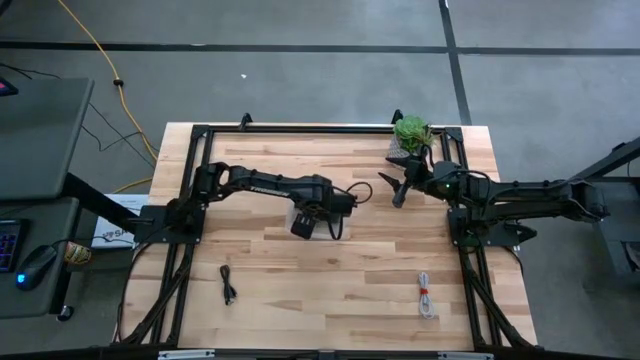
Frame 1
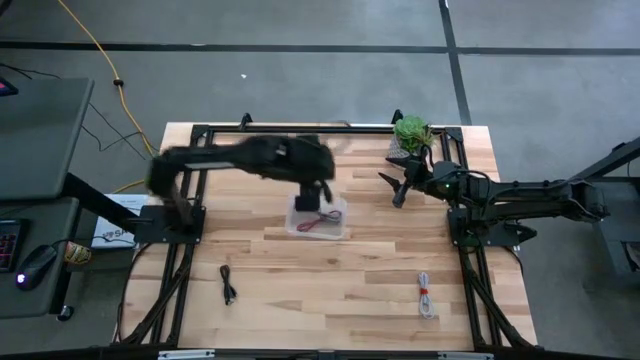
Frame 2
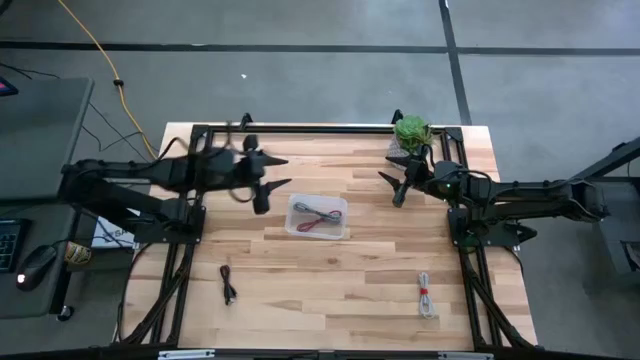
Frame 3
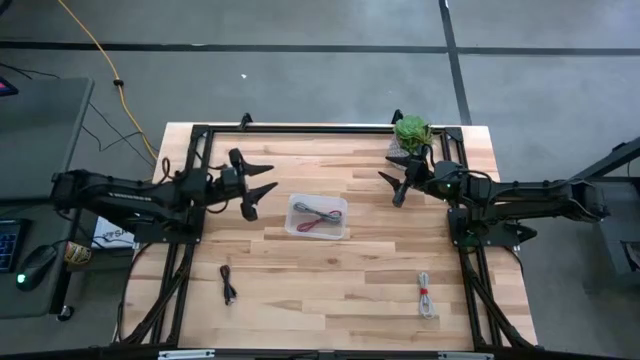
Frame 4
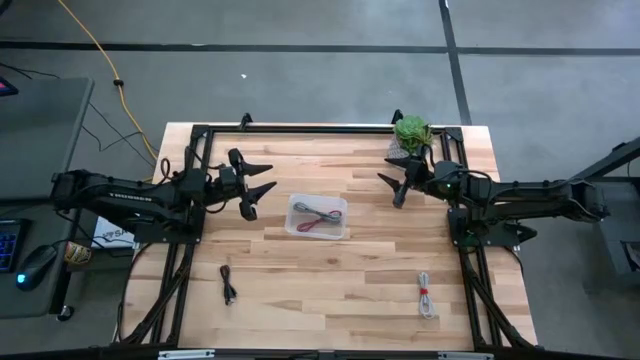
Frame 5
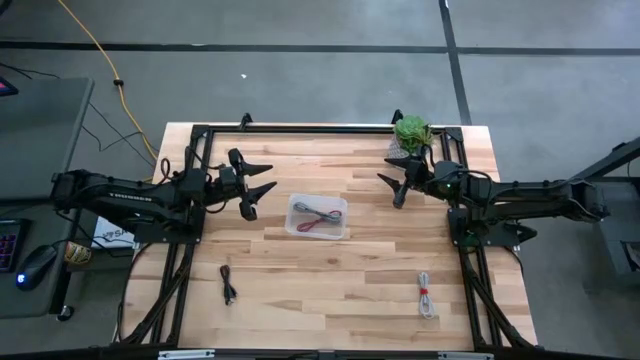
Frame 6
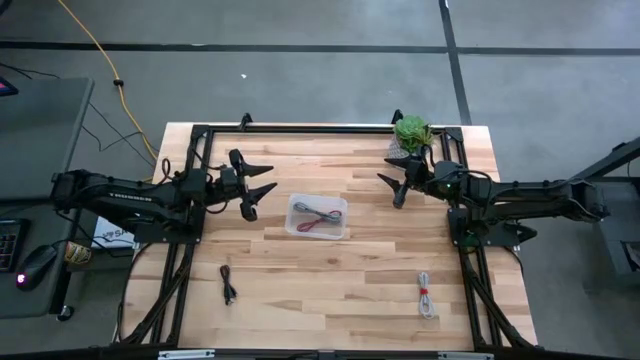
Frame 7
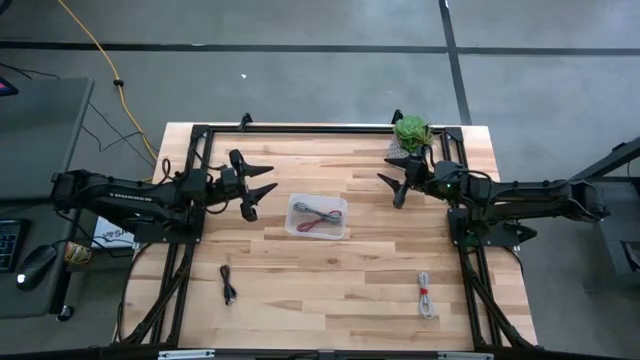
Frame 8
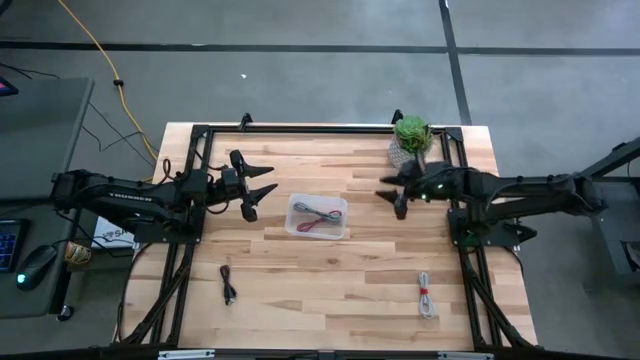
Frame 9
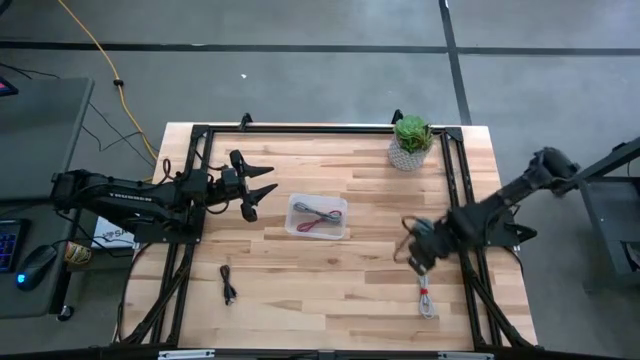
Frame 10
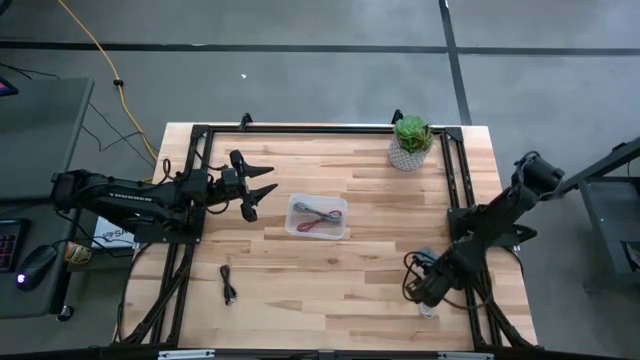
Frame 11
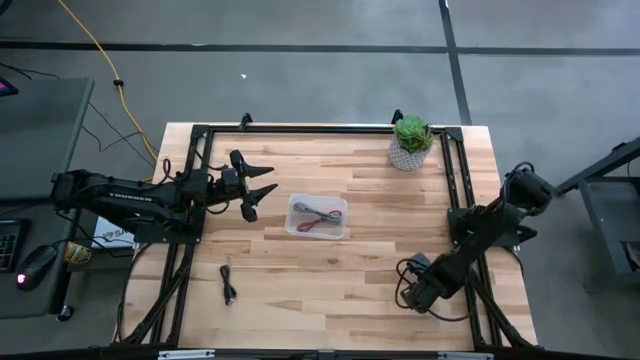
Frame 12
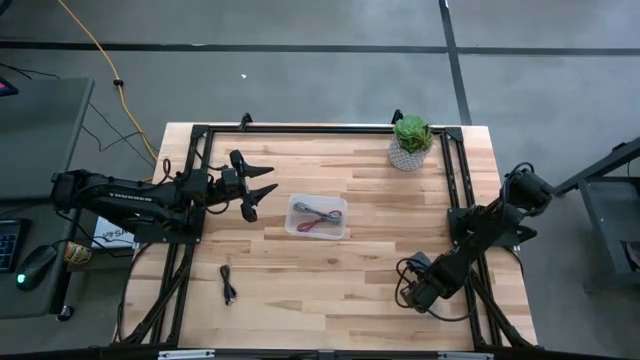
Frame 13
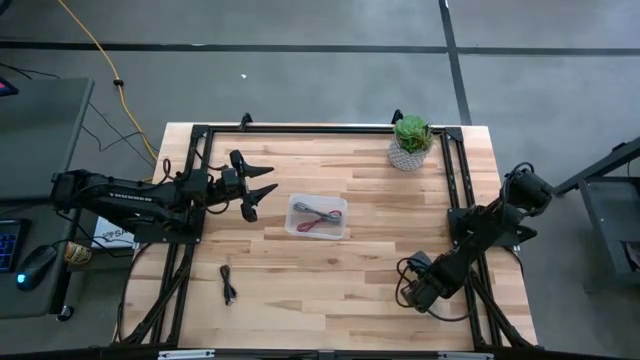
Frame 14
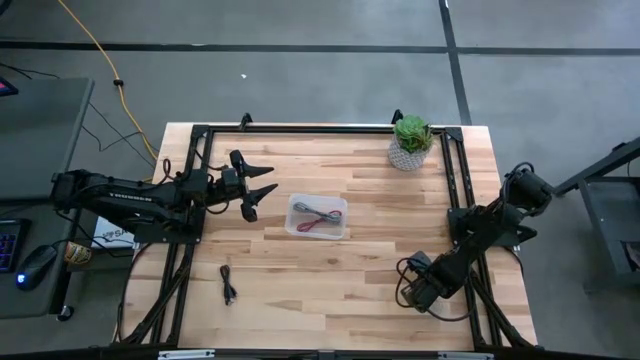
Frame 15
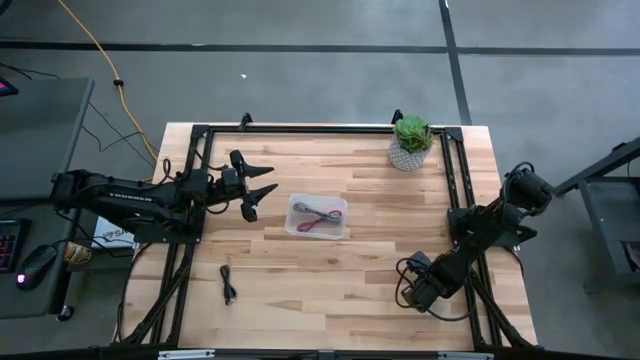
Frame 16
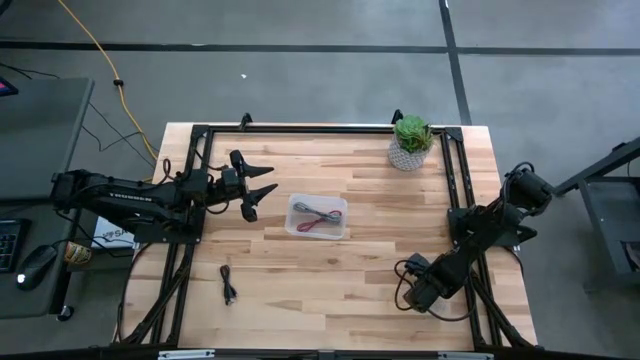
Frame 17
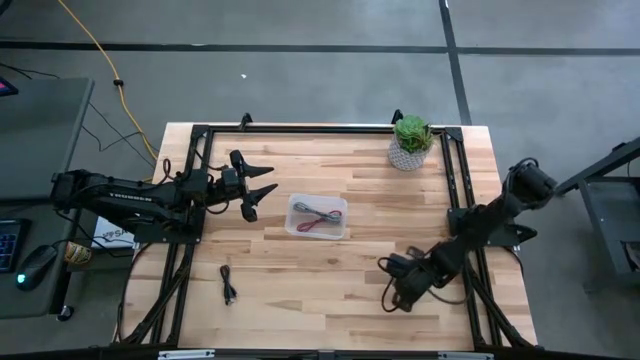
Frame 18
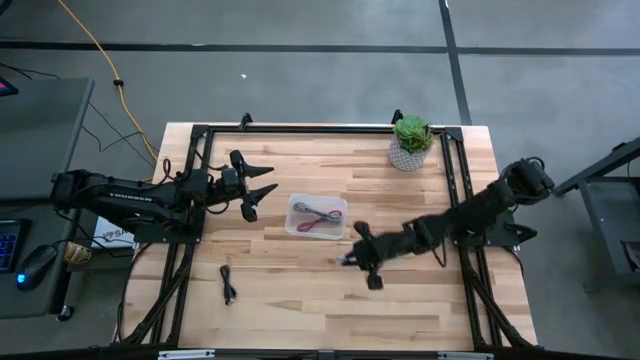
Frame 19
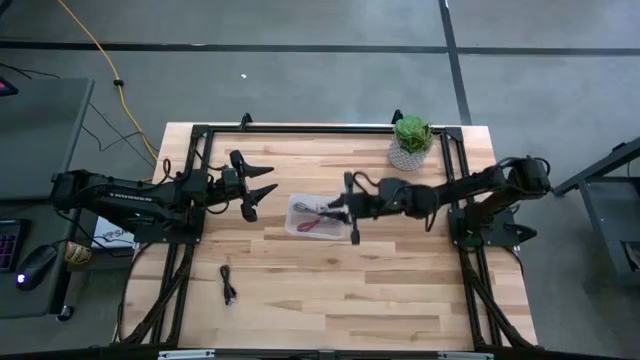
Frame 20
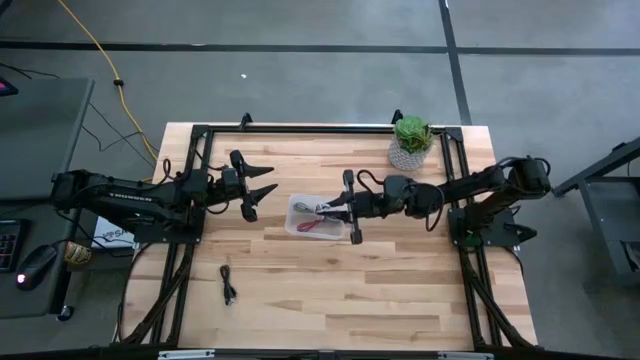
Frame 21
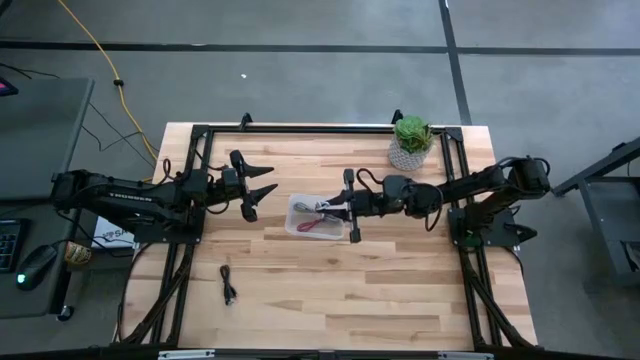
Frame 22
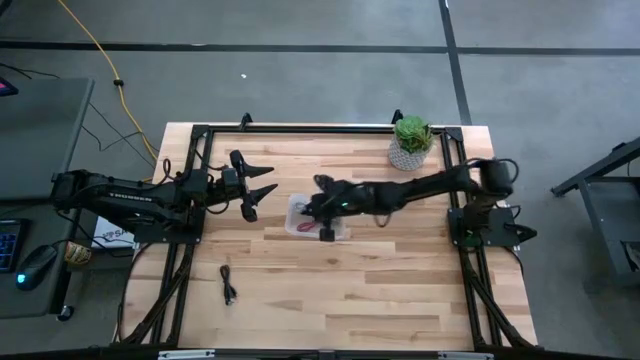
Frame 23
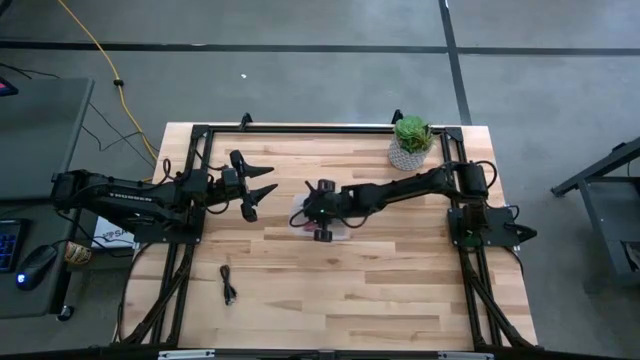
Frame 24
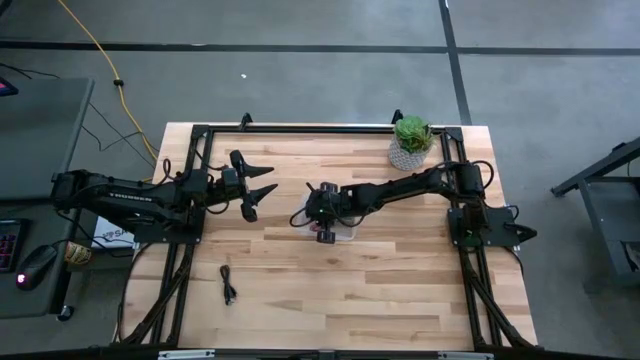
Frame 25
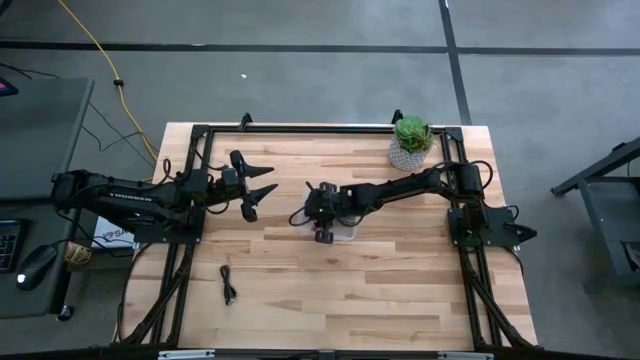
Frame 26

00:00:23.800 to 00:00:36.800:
Task: Pick and place USB-C Cables
Put the white charger cable into the transparent bin

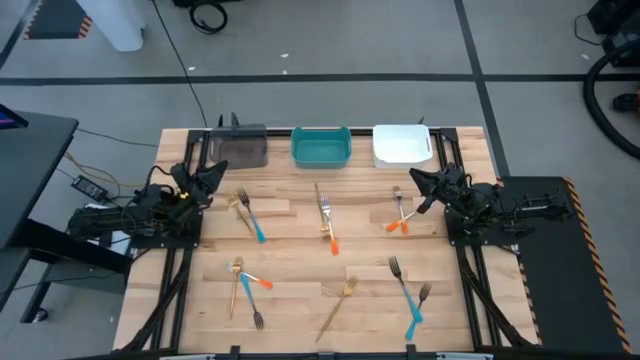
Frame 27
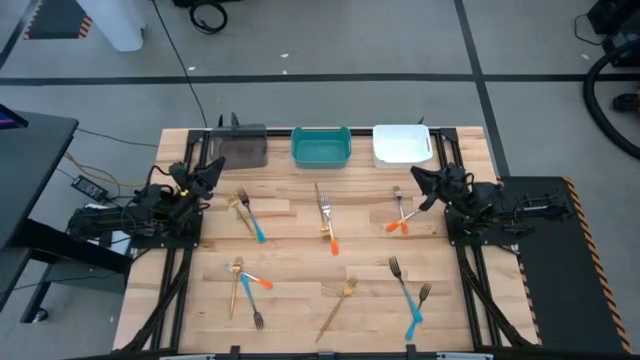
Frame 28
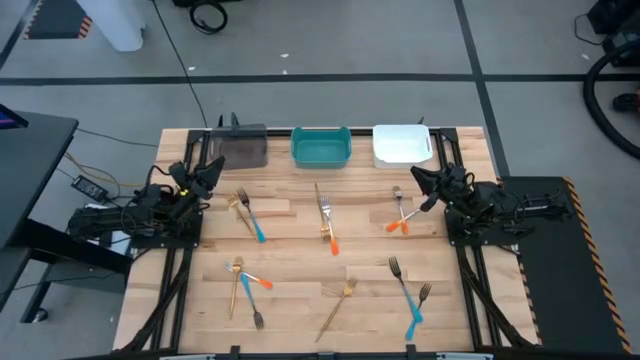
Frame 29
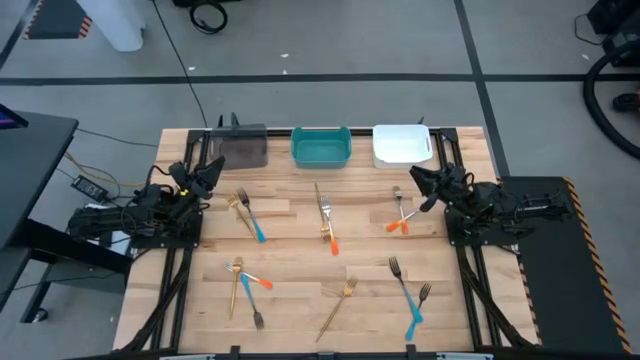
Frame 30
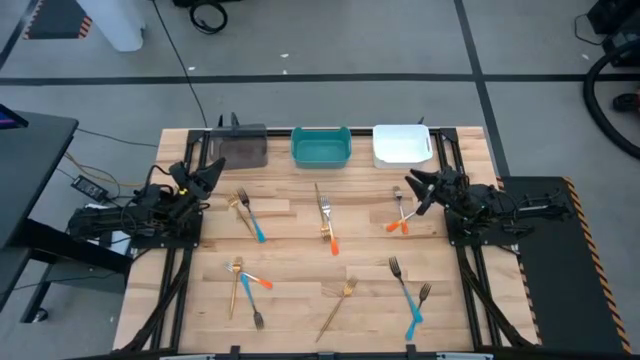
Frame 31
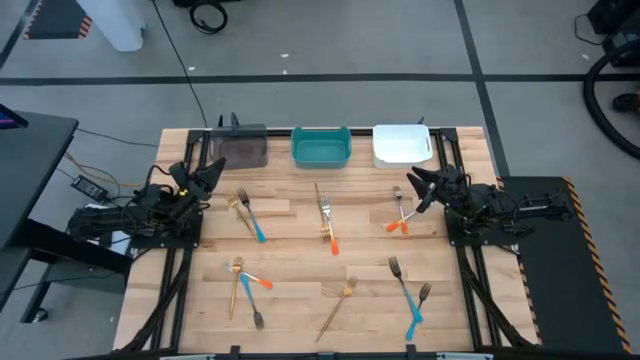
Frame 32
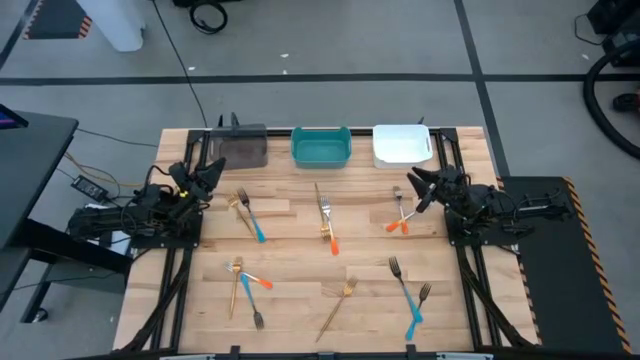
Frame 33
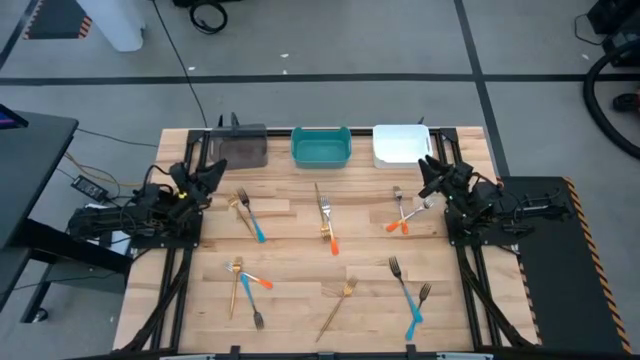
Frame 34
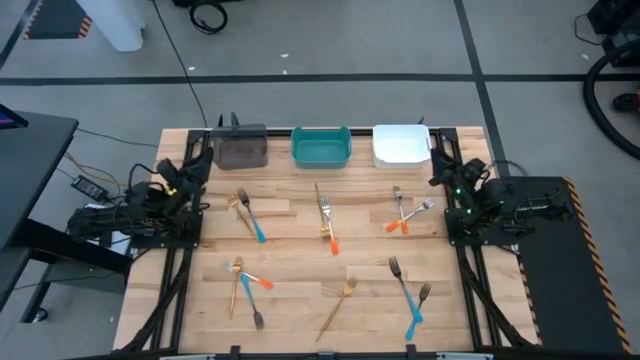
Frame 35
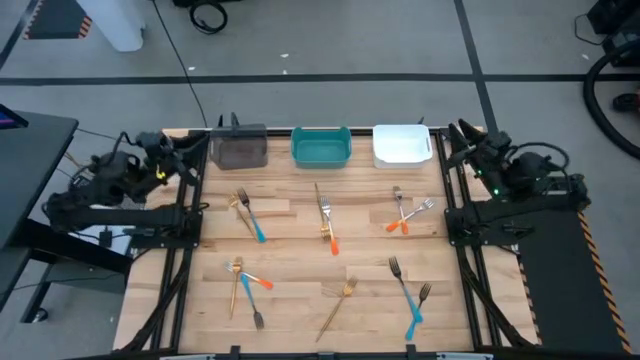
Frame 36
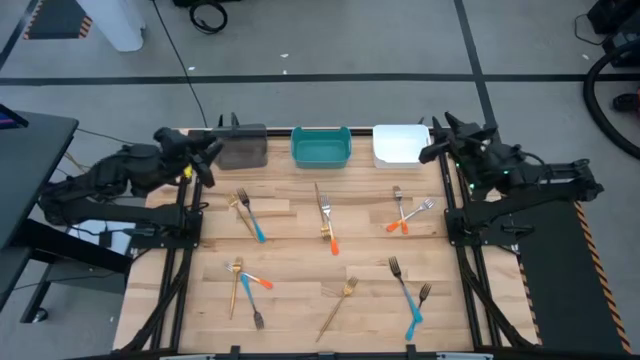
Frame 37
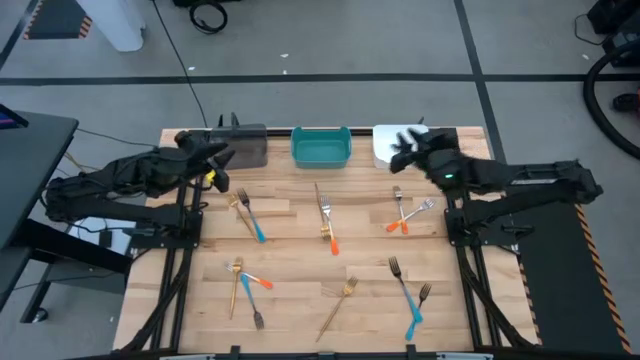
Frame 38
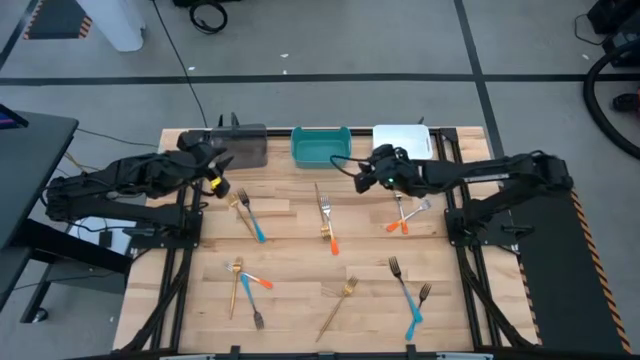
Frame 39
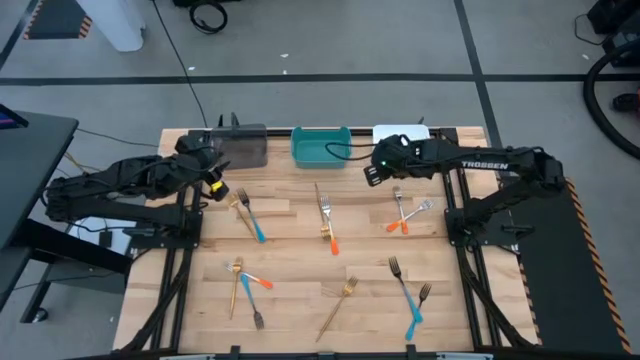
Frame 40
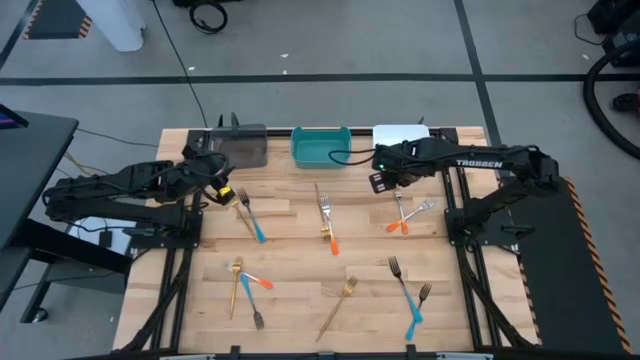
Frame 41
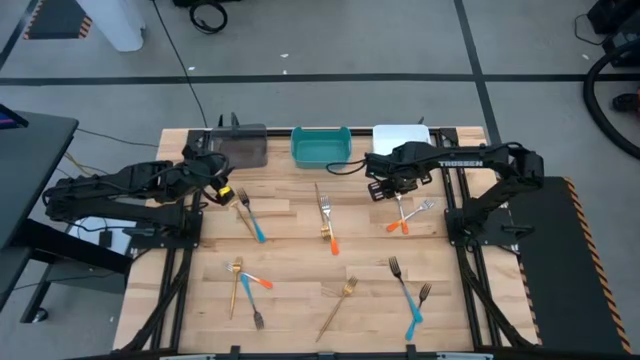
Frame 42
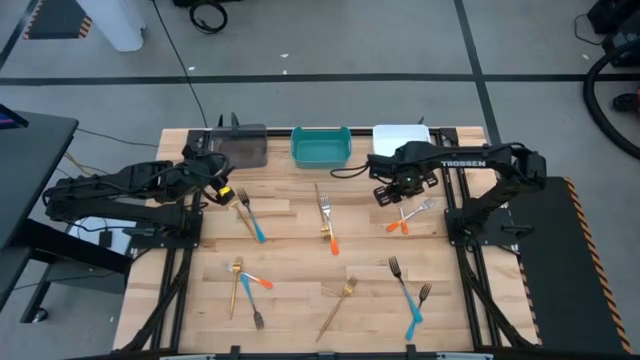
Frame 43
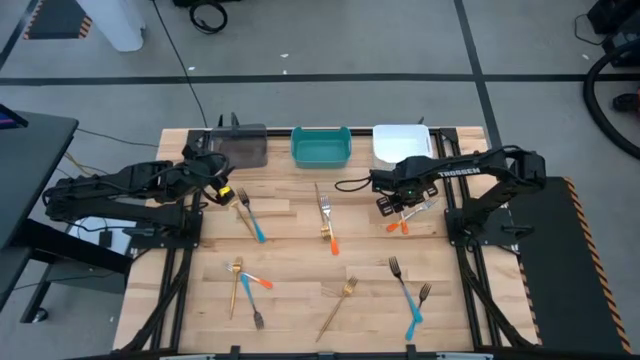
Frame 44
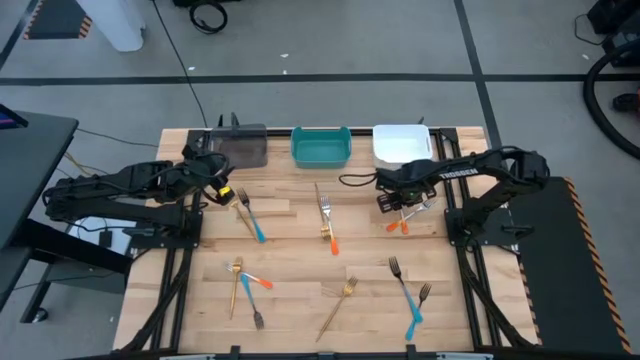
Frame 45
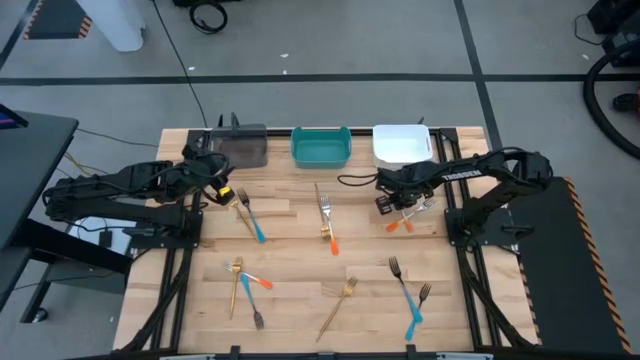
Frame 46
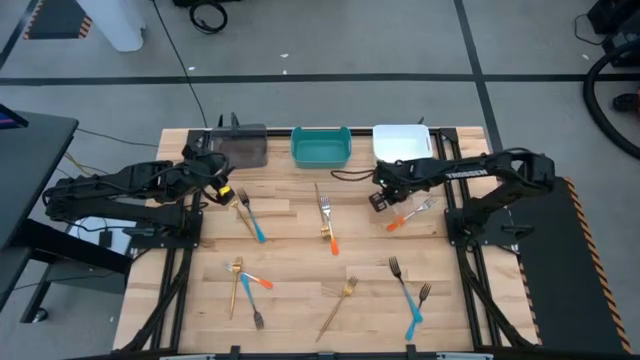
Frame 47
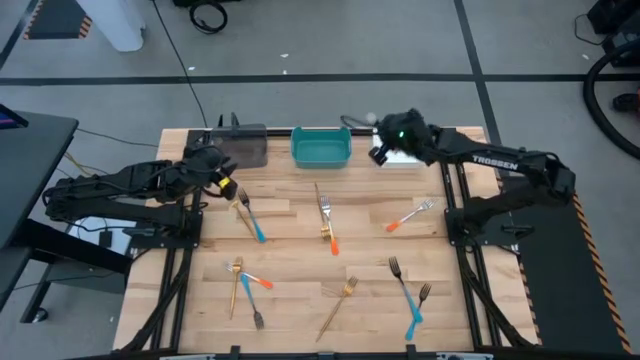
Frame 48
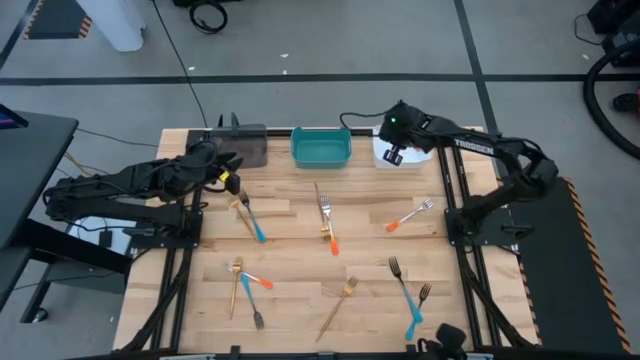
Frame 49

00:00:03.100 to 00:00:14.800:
Task: Sort silverware by color (type)
Put the orange fork into the white bin
